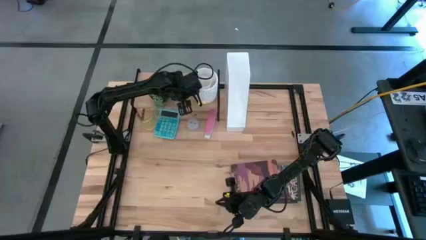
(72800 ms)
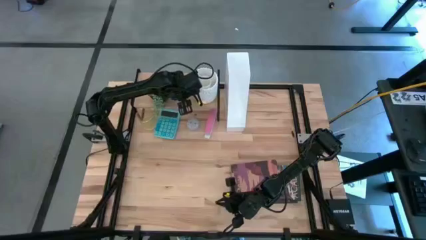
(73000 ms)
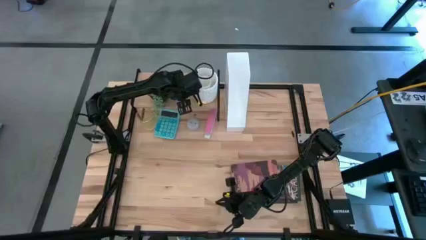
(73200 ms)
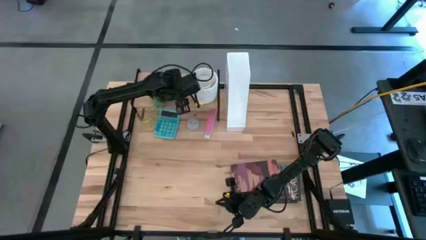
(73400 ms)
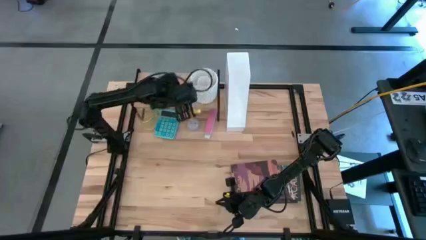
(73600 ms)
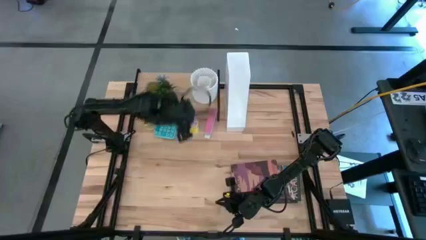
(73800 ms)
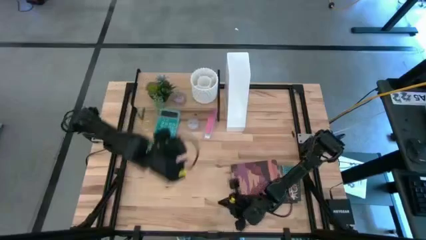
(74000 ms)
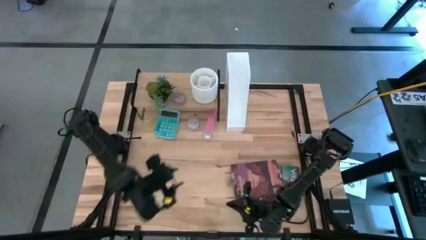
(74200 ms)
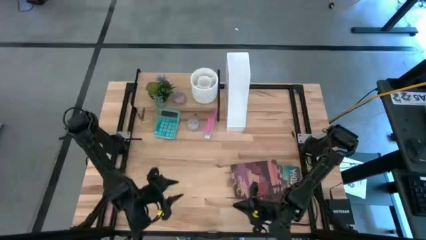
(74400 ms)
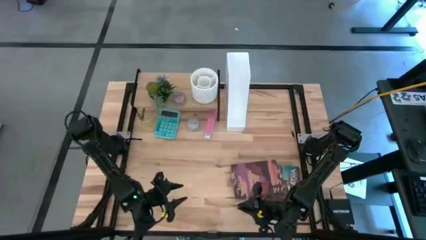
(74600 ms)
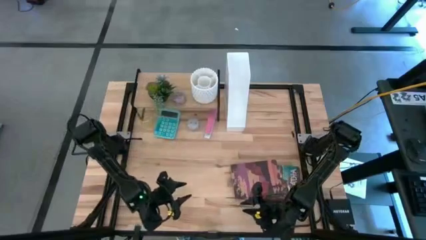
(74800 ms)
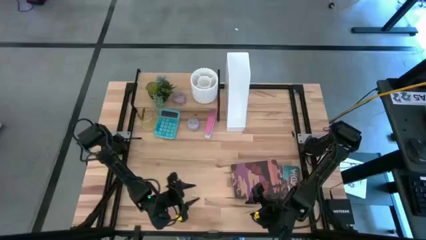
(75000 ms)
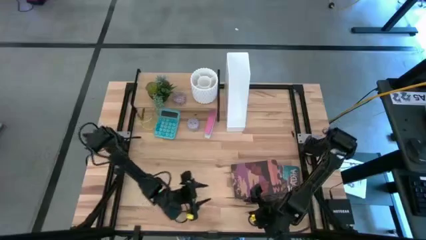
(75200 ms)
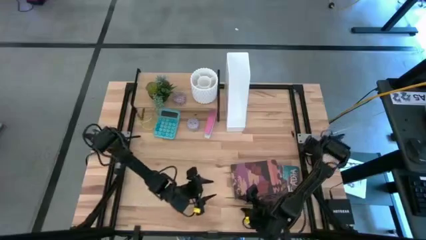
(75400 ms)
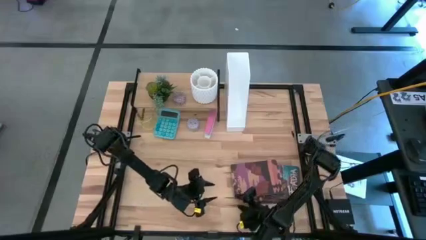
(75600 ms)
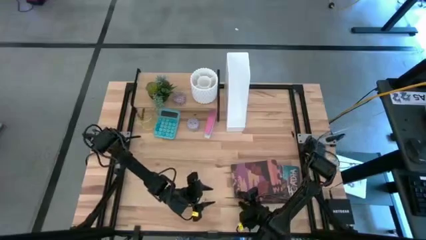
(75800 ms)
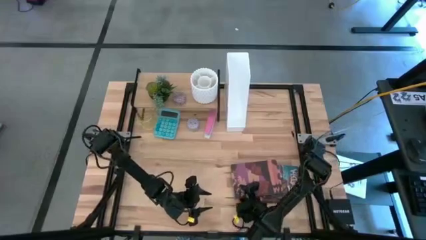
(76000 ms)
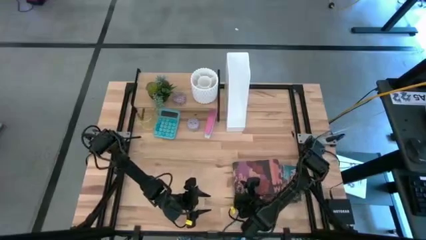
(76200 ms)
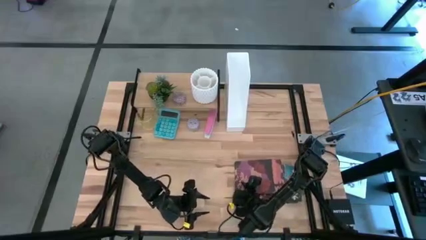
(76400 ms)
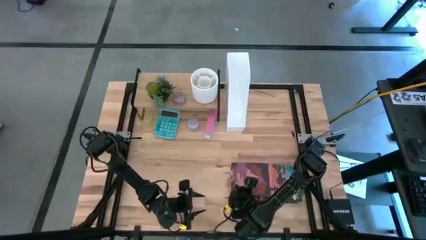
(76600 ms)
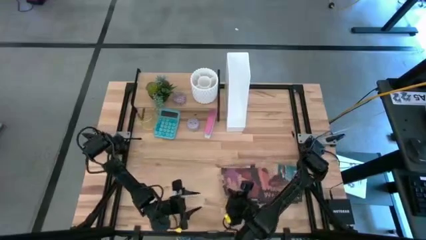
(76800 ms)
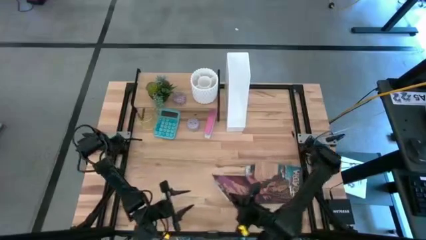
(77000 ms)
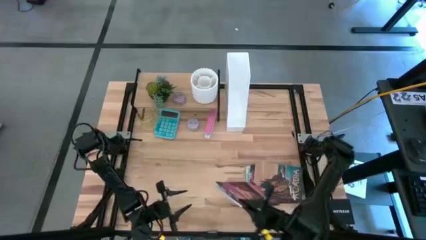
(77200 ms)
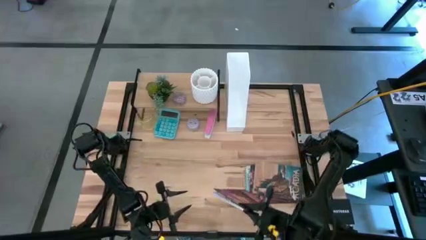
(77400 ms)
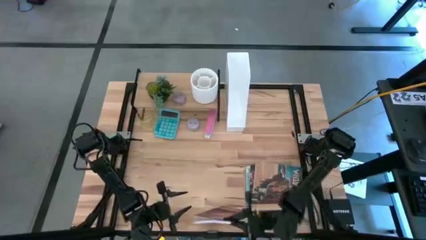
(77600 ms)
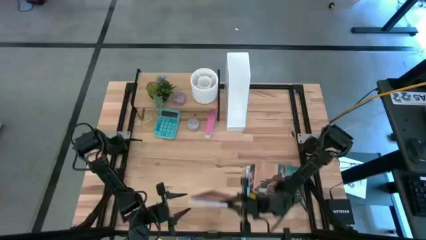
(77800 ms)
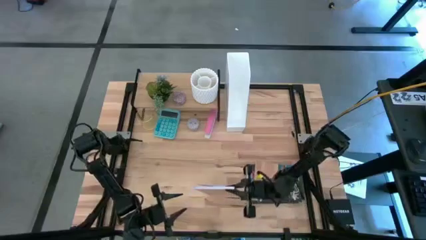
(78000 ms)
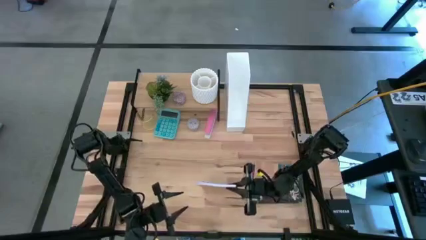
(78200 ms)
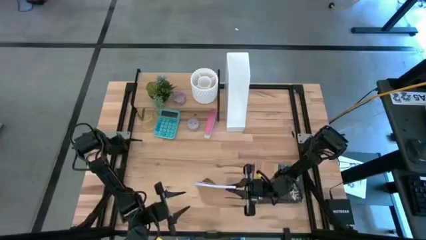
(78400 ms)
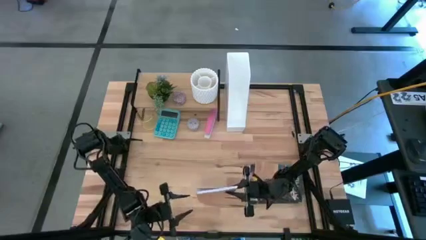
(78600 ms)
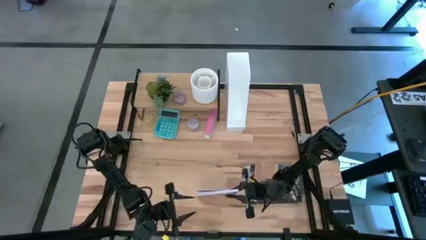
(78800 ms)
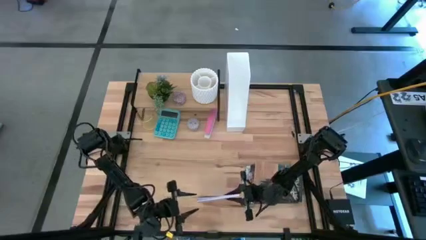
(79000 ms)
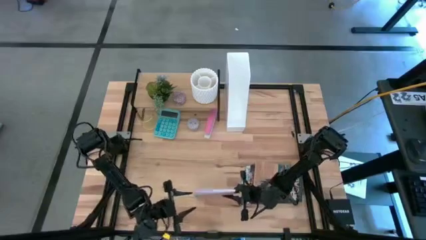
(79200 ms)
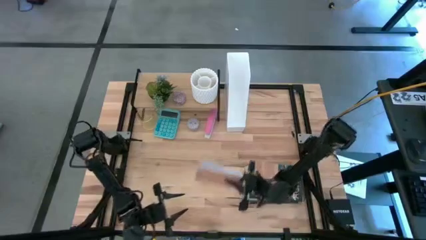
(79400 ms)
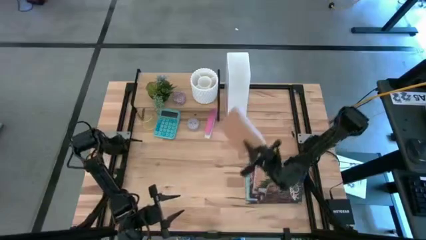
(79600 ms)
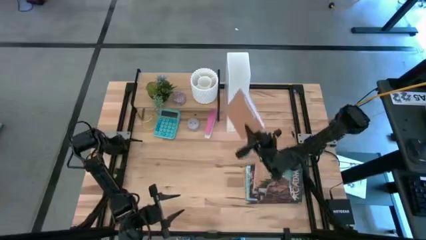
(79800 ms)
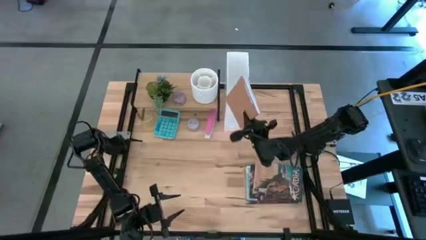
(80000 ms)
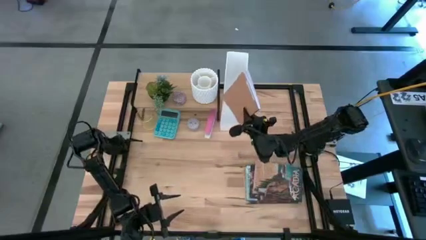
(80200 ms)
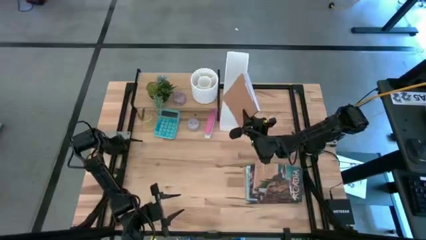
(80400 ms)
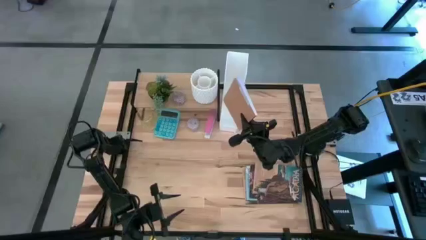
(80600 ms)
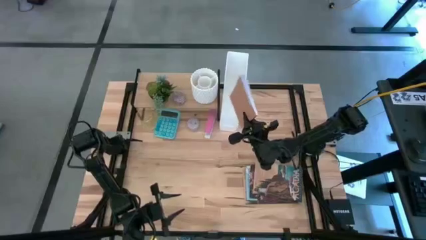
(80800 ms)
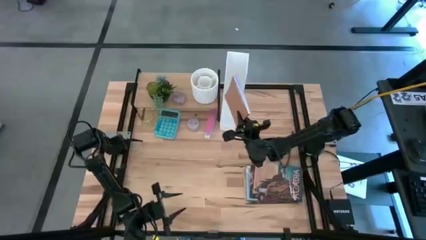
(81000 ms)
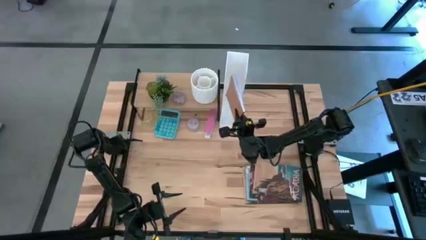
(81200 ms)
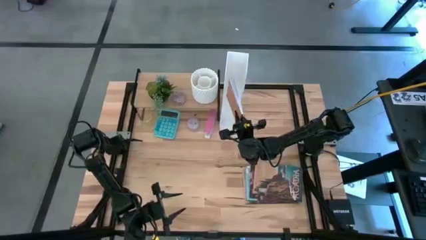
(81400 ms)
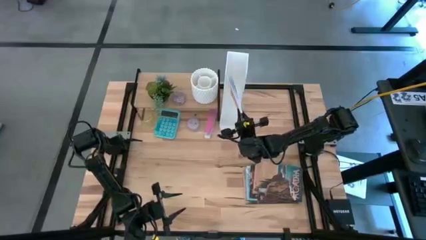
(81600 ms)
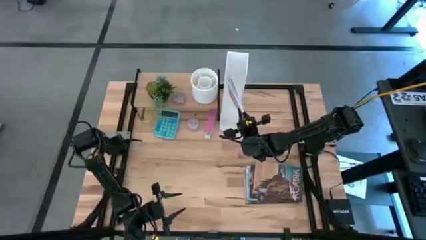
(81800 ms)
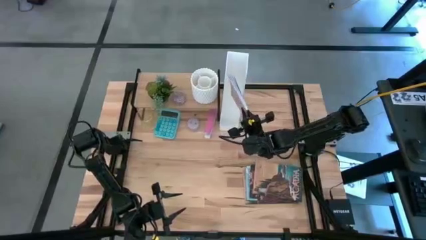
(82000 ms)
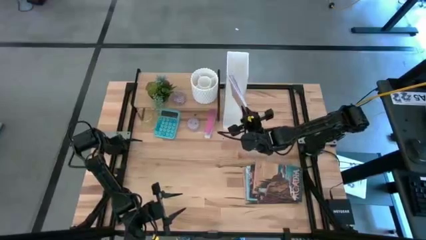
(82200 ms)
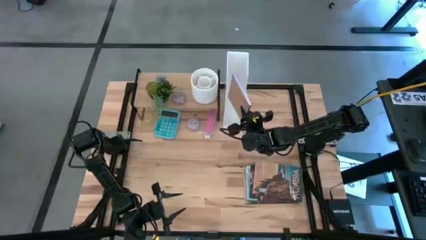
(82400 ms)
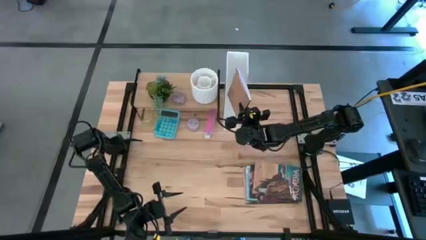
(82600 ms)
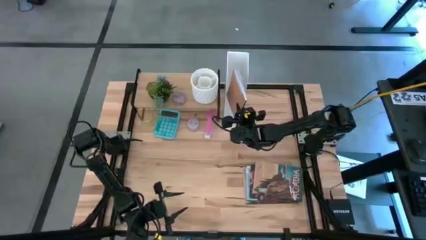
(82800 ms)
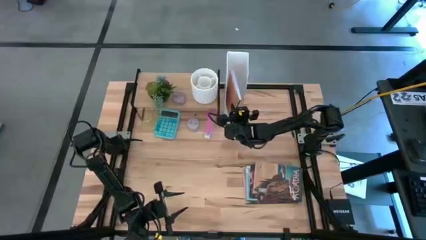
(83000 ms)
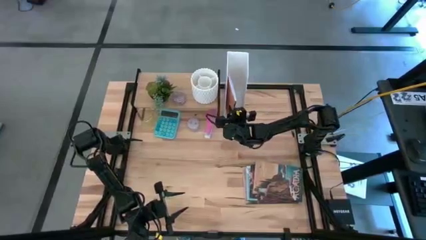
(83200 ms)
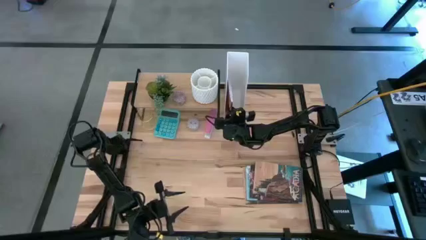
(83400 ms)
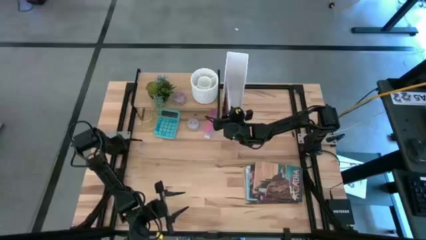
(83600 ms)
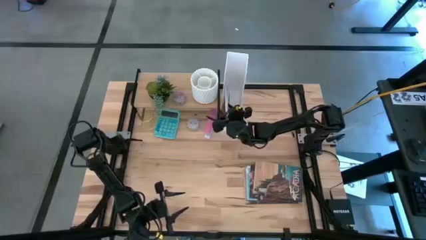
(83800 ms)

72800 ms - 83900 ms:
Task: Stock shelves
Put the purple book in the book organizer

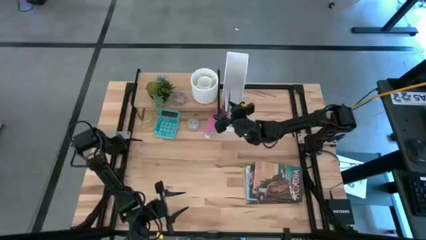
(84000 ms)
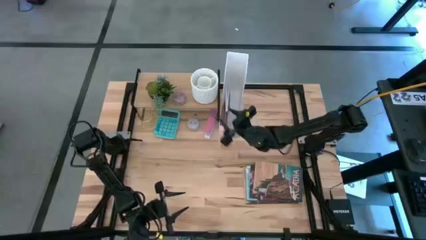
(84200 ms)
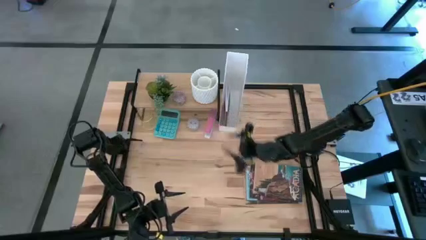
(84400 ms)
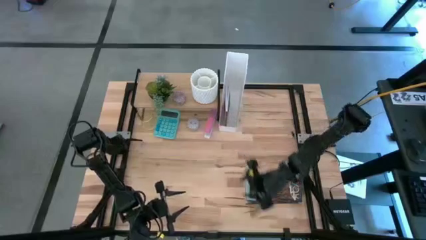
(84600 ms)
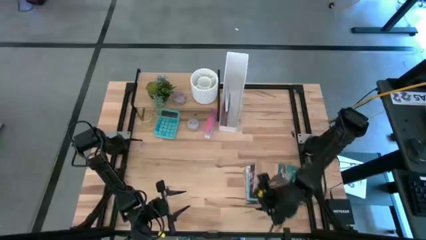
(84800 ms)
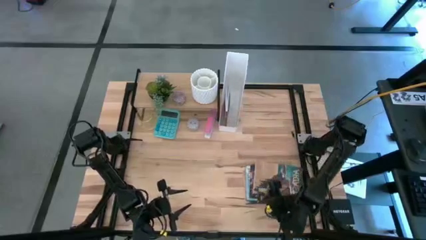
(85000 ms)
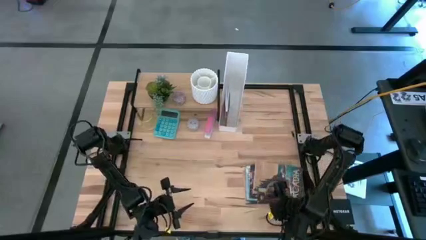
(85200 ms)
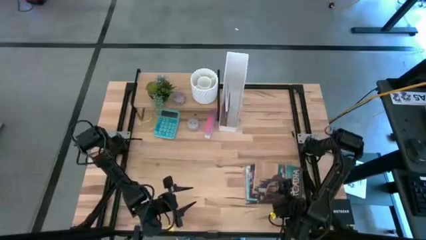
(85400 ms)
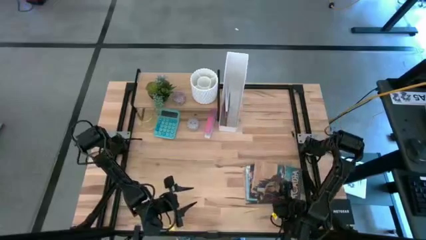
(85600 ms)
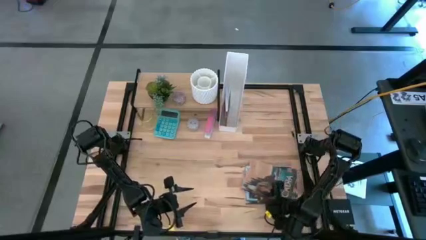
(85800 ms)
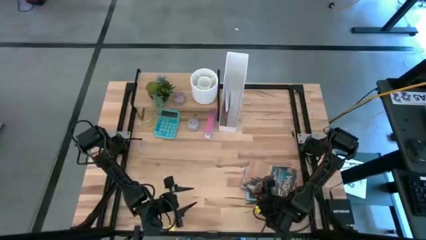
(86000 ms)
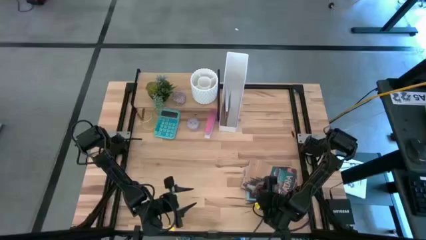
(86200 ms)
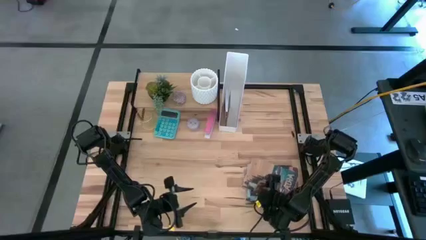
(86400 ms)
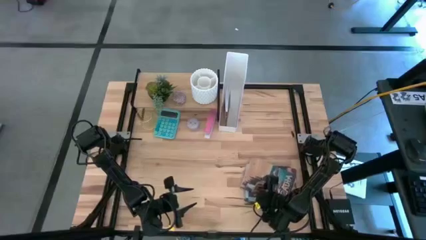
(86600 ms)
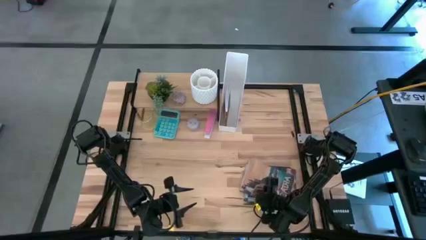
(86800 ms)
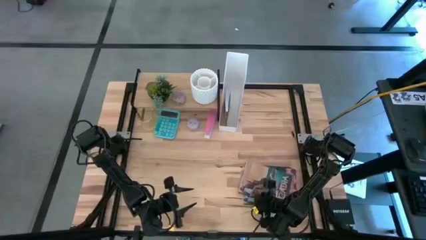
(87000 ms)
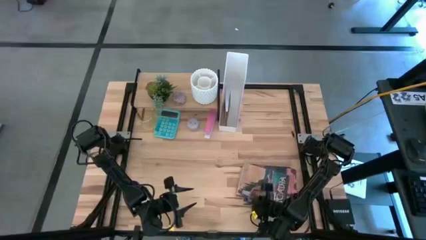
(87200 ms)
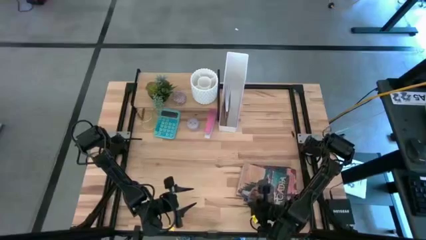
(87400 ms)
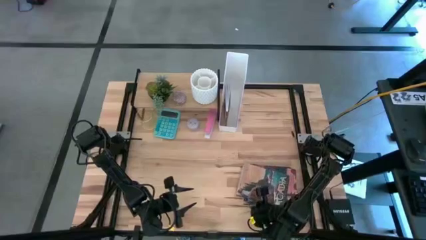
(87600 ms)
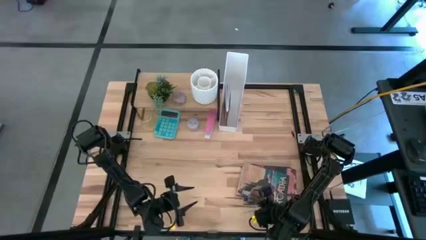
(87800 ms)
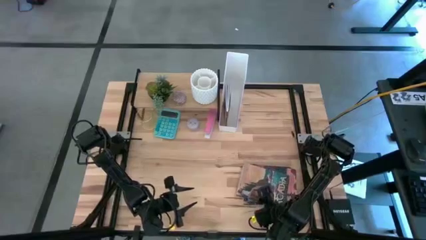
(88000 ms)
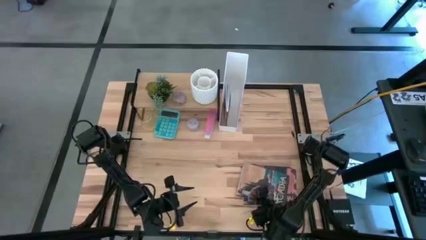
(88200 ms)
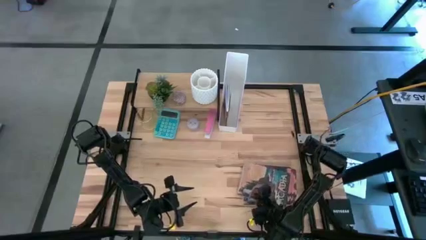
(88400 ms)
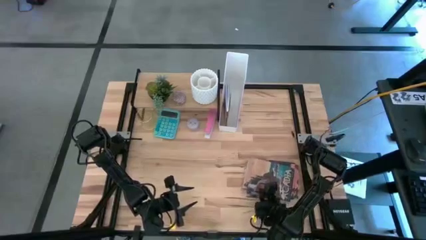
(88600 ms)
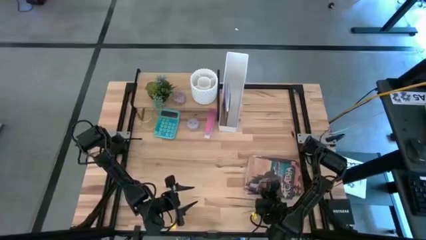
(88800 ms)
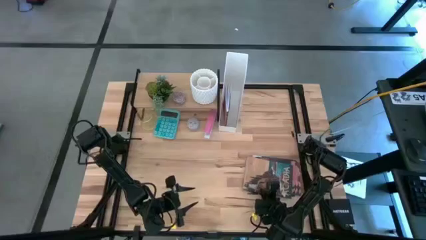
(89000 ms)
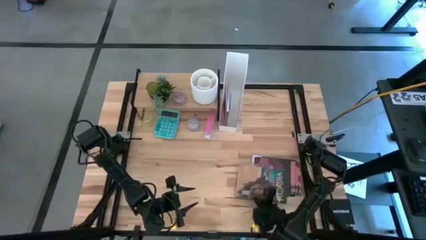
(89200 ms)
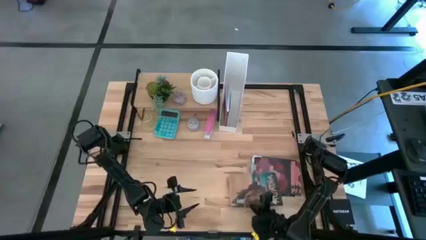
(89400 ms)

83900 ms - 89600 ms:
Put the brown book in the book organizer
